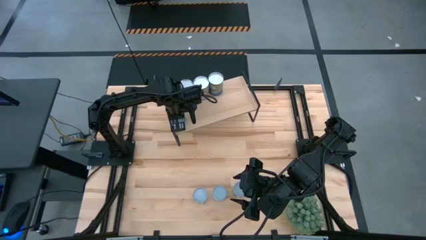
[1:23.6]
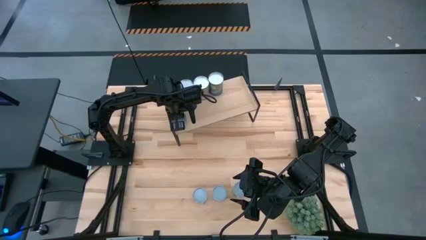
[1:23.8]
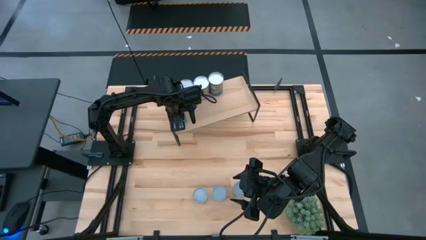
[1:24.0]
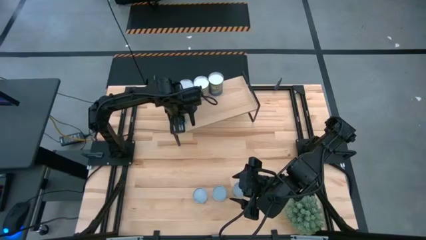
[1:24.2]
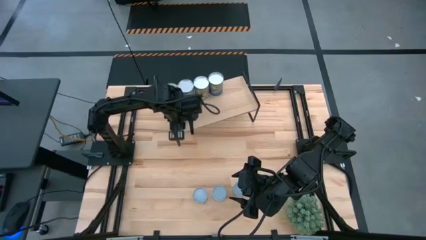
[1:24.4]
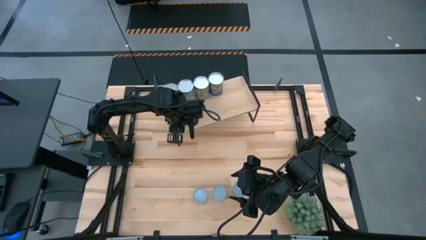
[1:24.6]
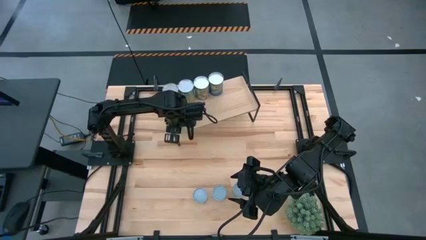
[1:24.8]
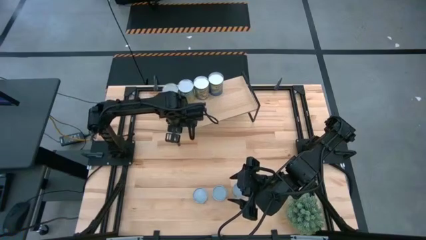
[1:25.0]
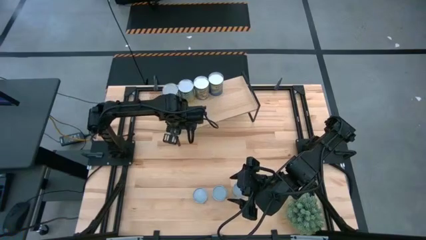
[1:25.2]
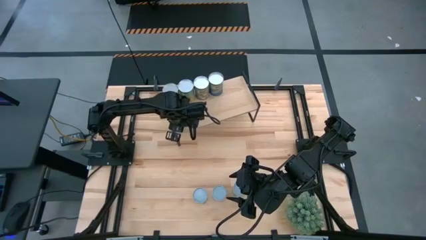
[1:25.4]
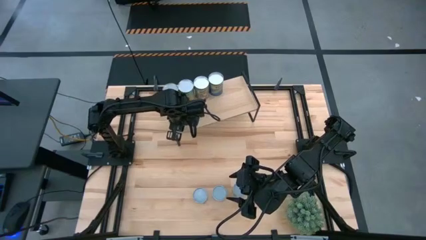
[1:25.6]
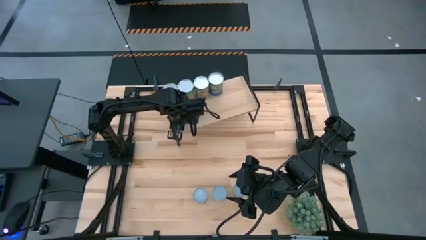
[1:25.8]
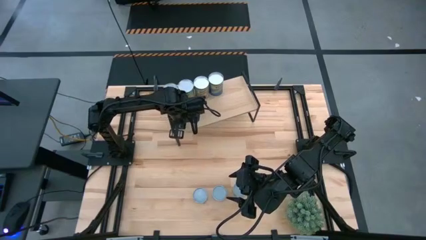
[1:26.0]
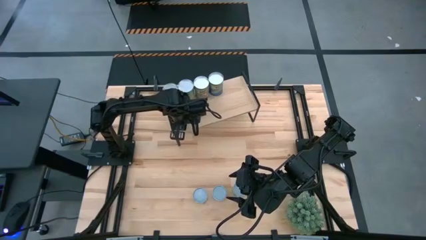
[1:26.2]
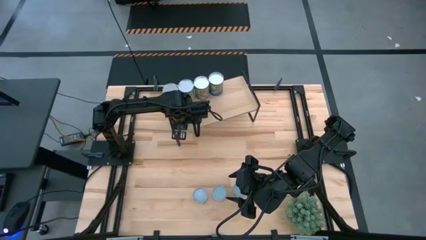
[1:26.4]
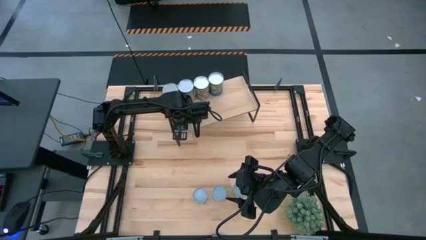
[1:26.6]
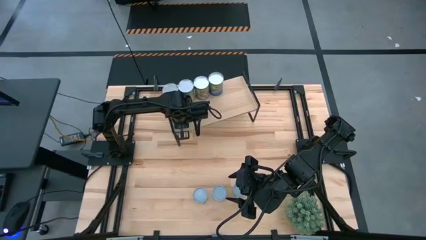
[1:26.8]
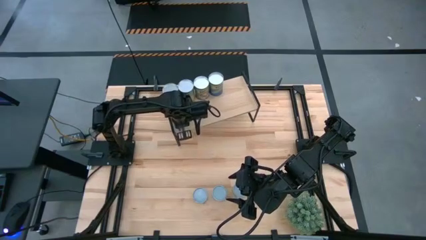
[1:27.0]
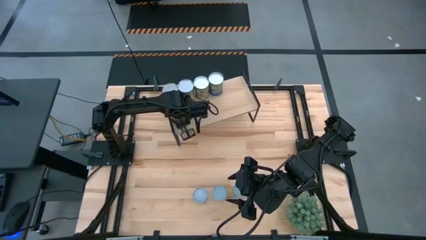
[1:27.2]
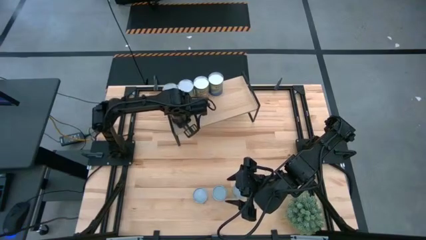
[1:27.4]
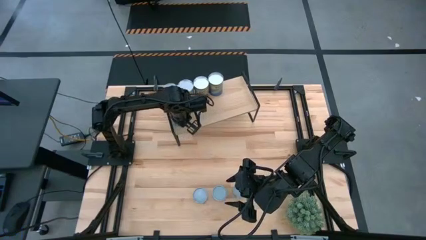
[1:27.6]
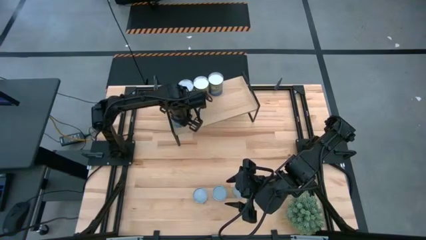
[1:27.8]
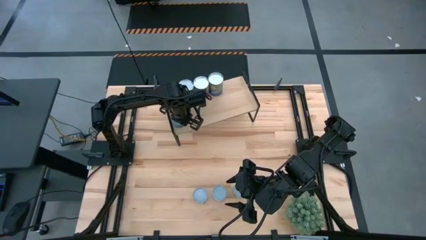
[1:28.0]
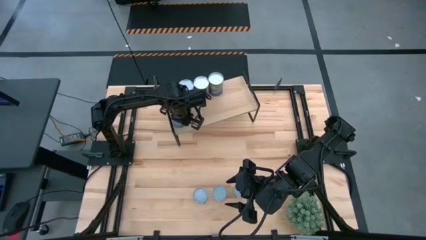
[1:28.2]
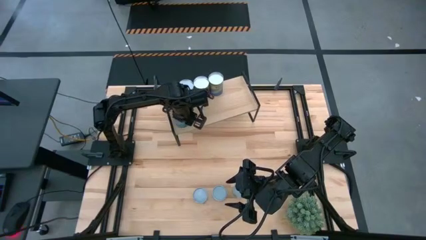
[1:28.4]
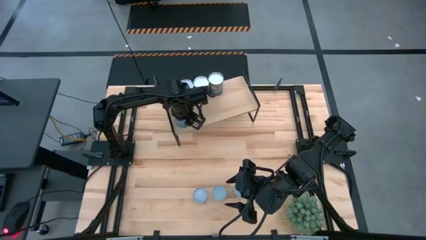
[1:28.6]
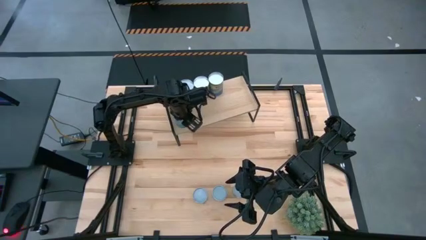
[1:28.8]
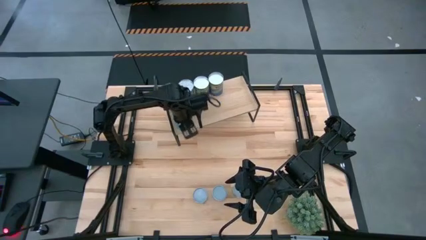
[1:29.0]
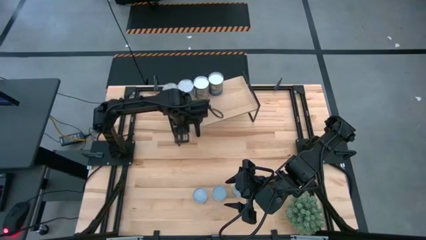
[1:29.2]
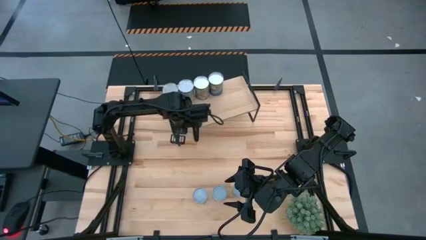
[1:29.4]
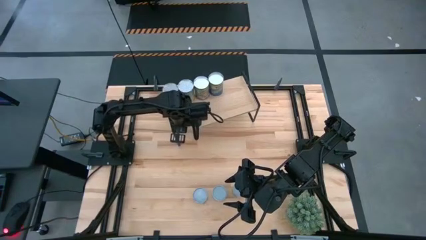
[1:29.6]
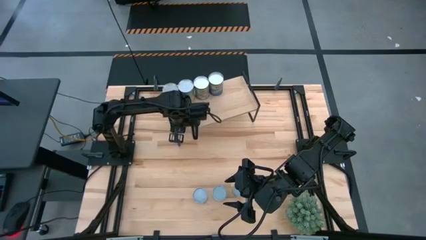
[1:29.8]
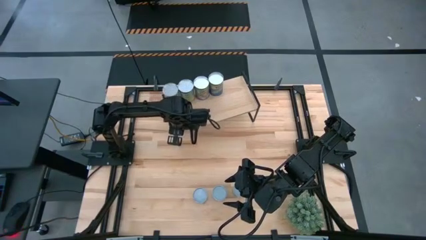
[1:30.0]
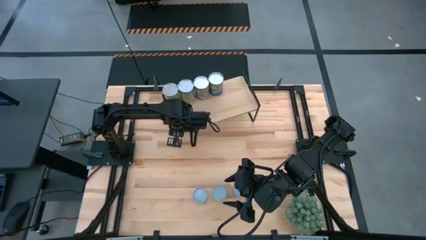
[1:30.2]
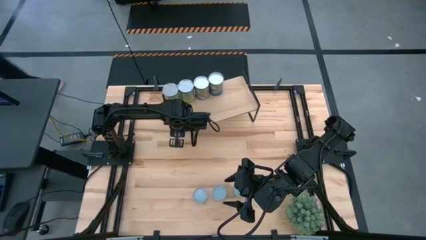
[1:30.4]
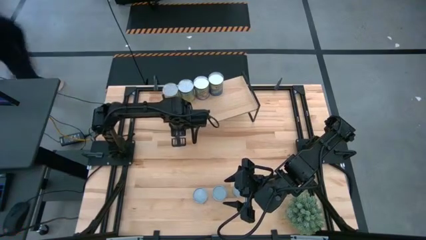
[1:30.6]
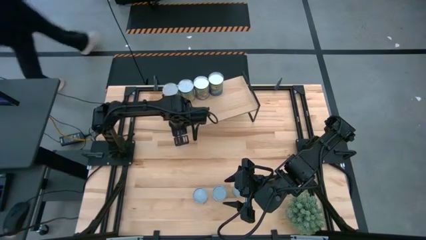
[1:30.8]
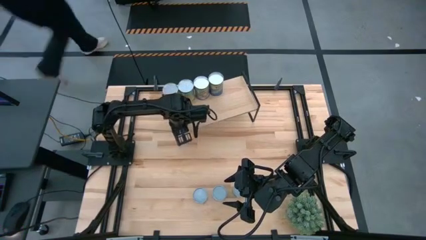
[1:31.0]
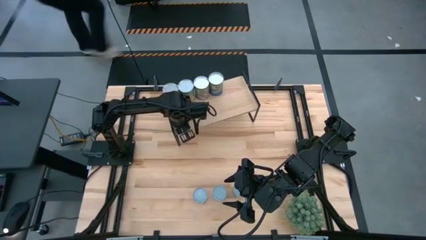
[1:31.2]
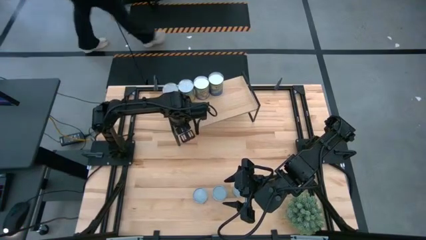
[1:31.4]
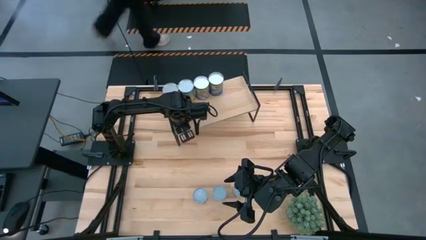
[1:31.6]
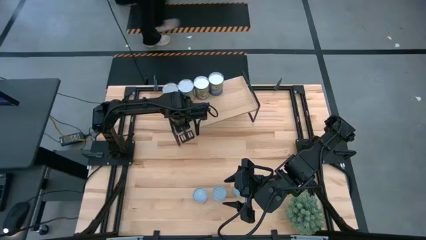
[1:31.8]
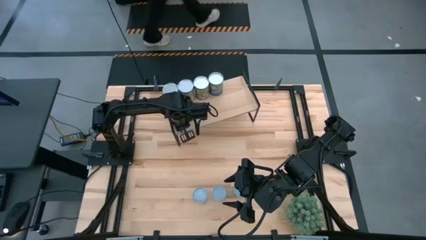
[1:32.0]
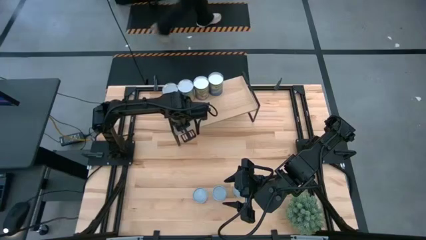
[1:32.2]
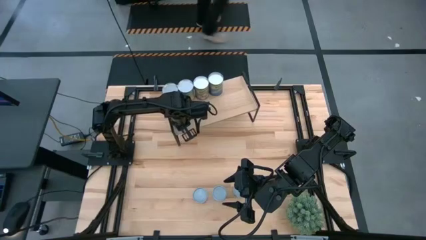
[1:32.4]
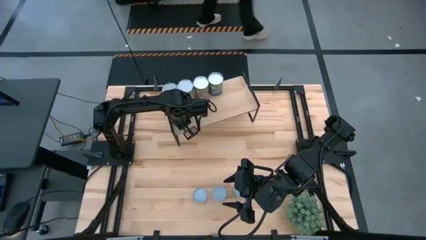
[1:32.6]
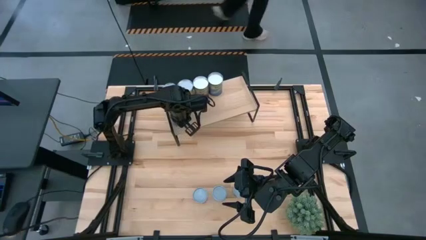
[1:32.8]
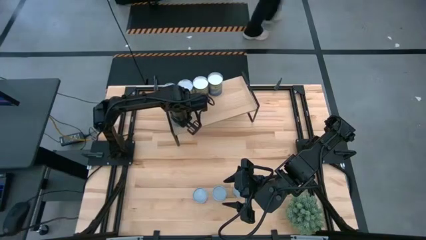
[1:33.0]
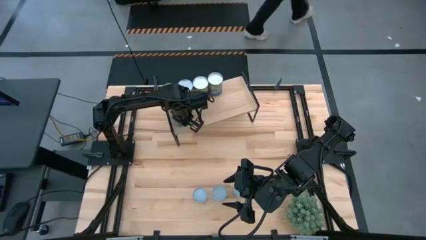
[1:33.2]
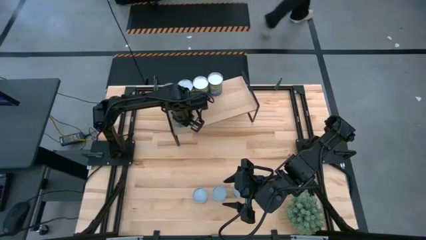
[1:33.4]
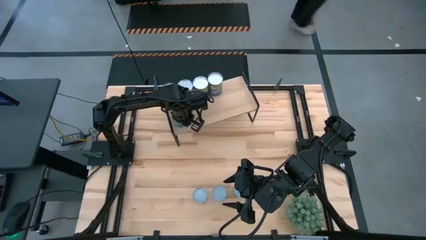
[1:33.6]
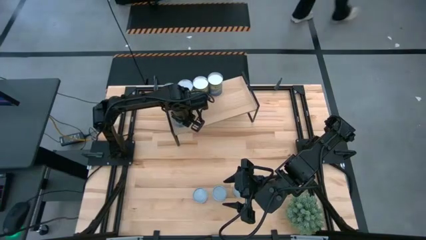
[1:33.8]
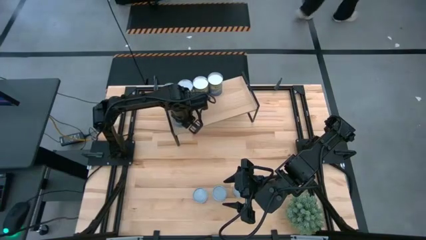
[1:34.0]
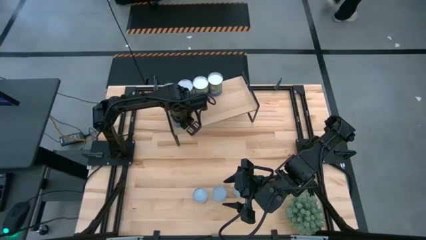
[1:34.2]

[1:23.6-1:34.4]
Task: Pick and place cans onto a shelf
Put the canned tuna on the shelf

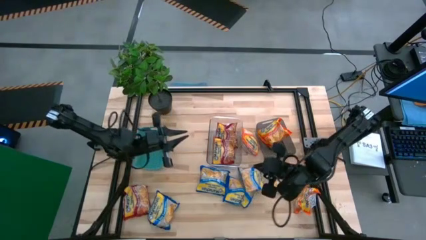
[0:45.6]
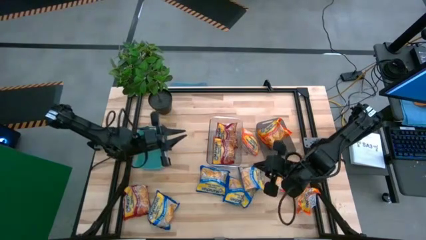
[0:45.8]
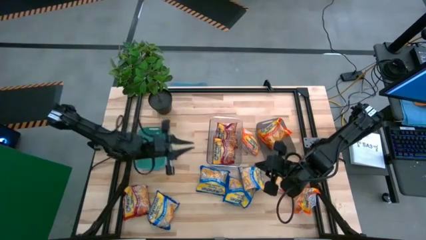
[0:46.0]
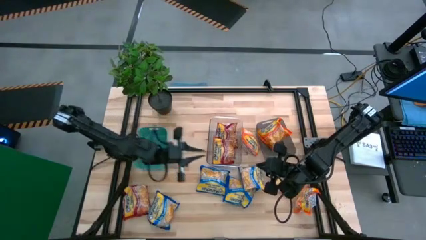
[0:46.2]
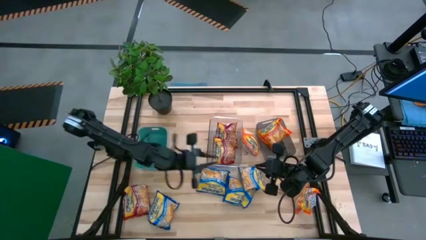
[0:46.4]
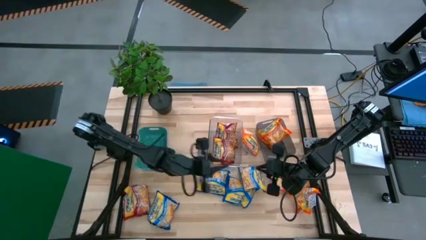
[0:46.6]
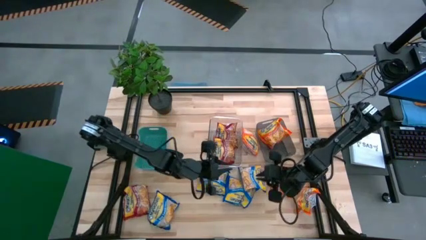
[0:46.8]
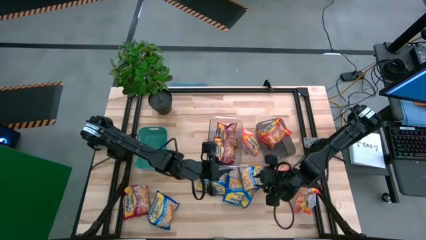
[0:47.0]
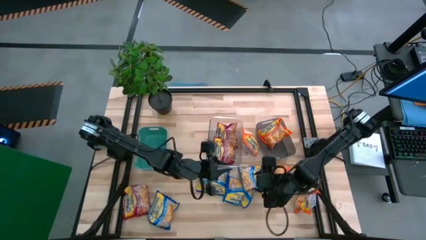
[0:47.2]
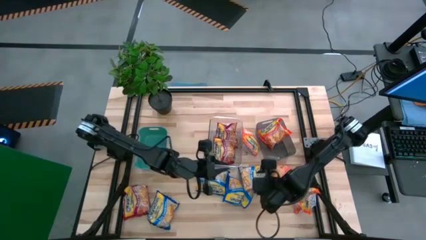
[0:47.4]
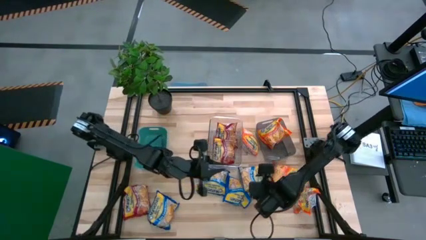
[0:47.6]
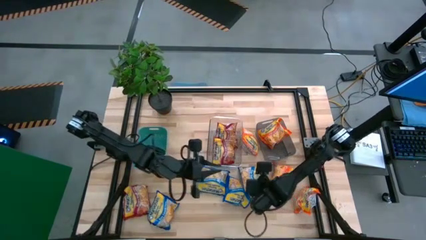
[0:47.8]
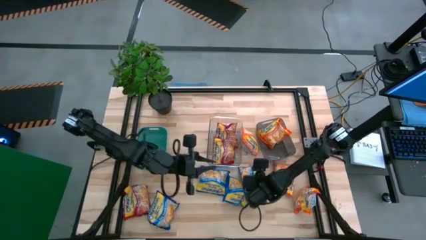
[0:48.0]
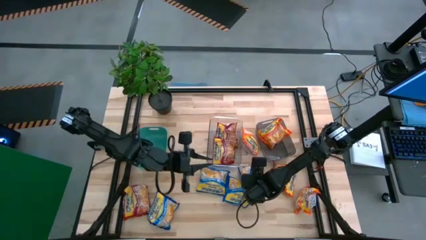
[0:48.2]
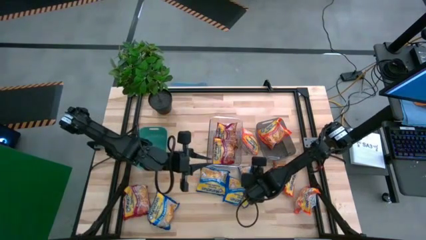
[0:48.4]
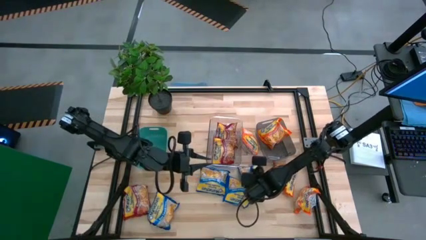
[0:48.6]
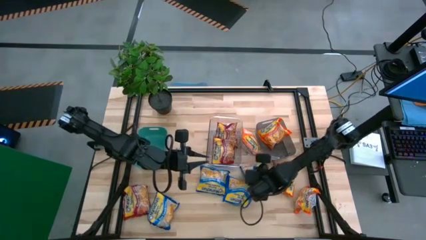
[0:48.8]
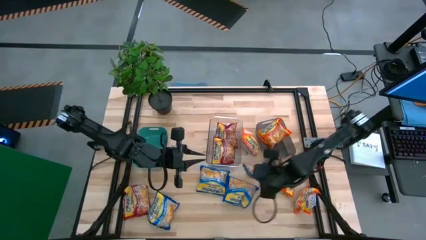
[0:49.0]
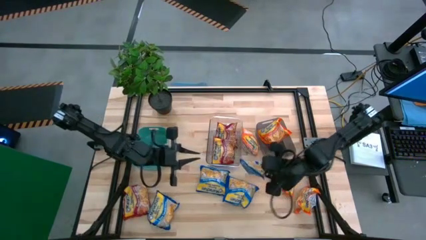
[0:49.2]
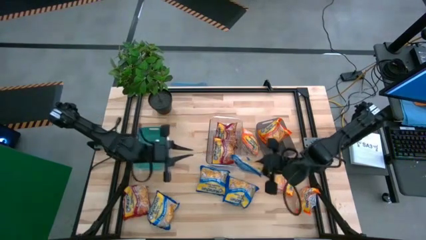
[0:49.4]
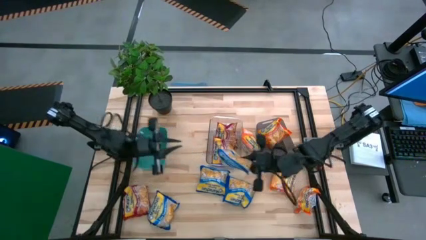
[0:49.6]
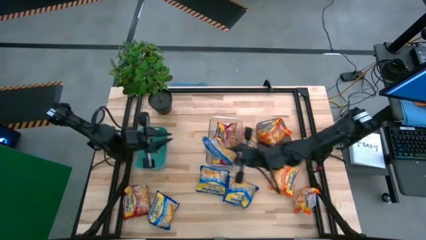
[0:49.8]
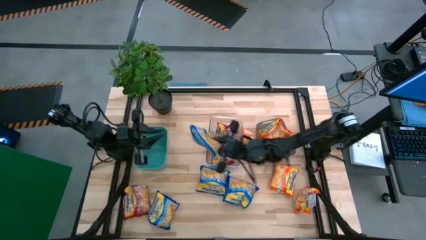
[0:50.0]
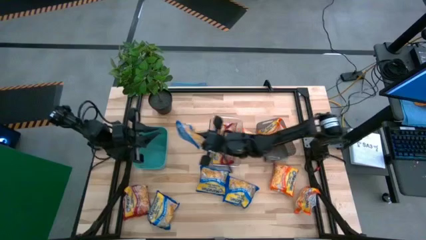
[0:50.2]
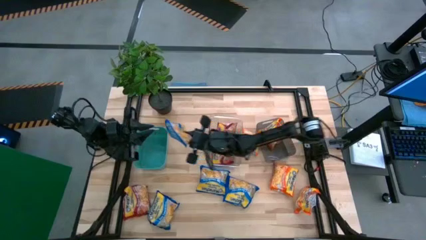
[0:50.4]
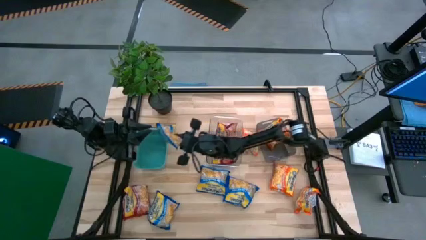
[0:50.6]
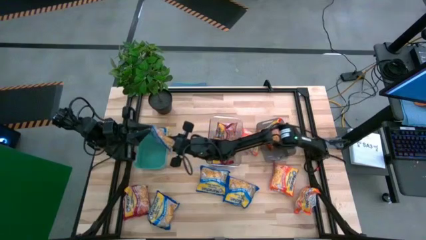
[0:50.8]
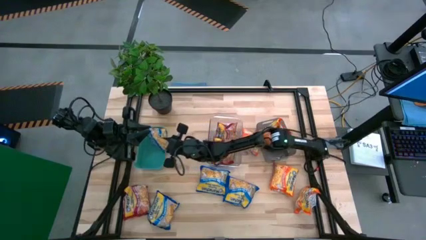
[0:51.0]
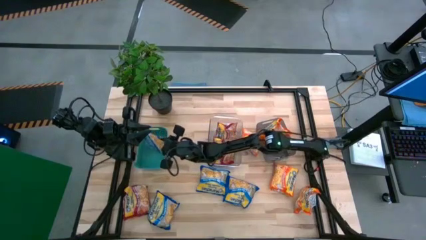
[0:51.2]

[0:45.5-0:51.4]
Task: Sort Maruchan noodles
Put the blue noodle pack into the green bin
